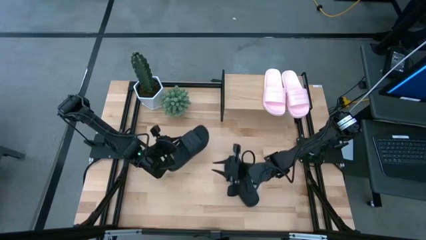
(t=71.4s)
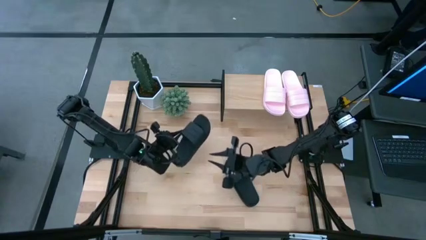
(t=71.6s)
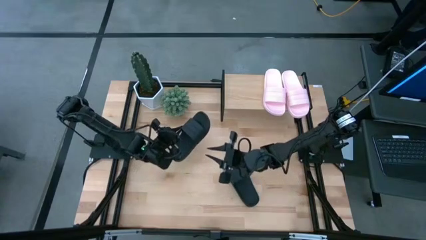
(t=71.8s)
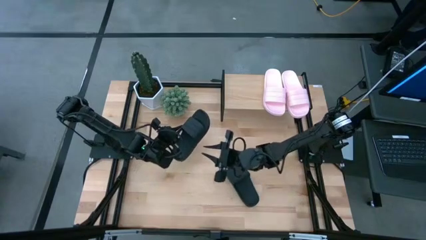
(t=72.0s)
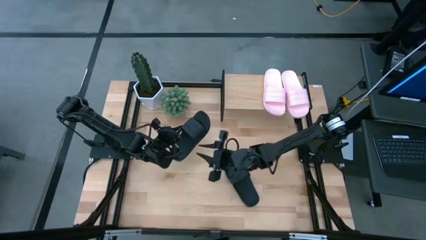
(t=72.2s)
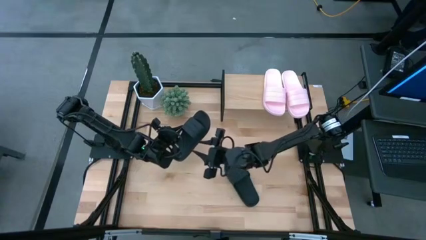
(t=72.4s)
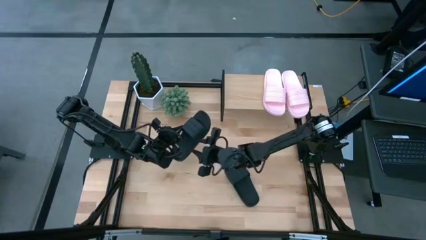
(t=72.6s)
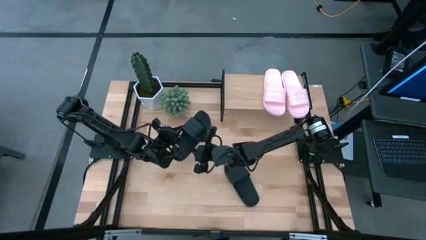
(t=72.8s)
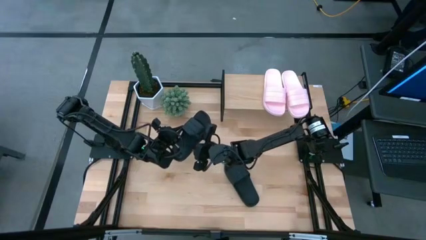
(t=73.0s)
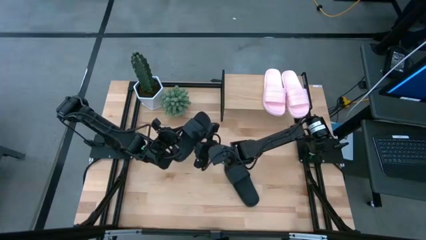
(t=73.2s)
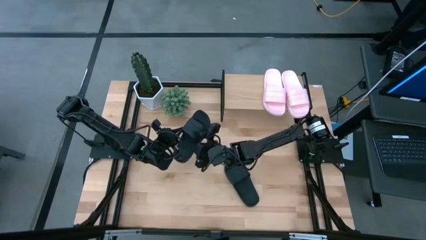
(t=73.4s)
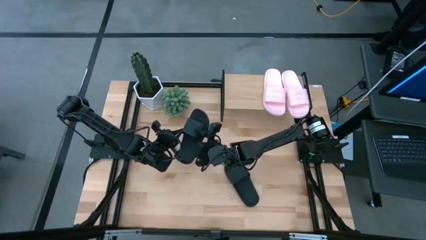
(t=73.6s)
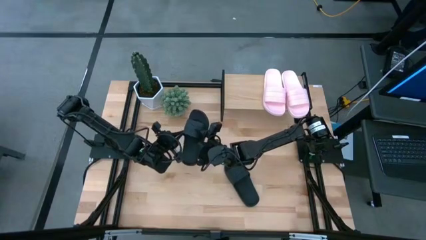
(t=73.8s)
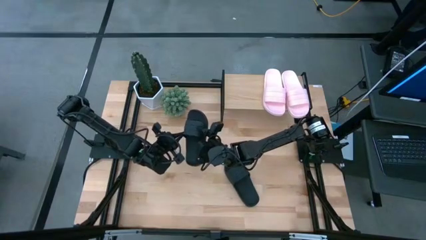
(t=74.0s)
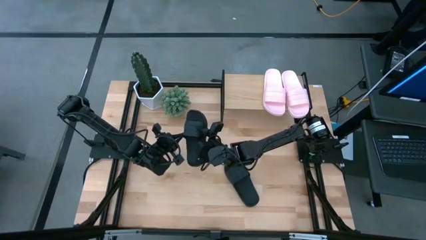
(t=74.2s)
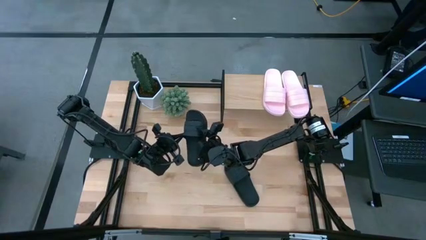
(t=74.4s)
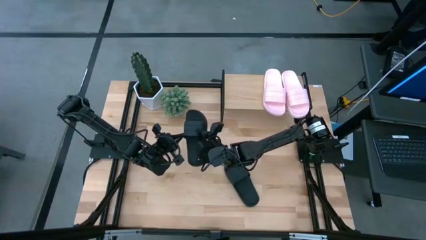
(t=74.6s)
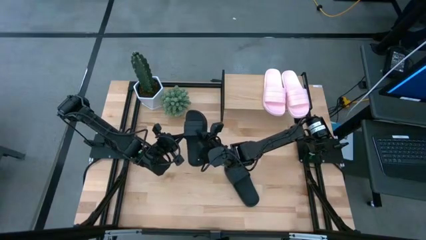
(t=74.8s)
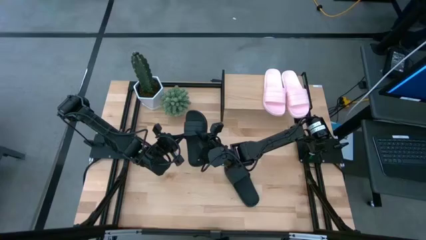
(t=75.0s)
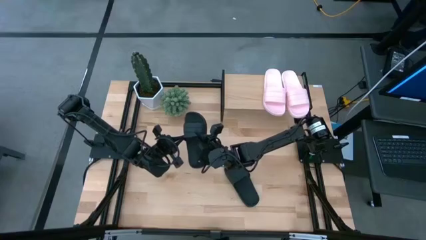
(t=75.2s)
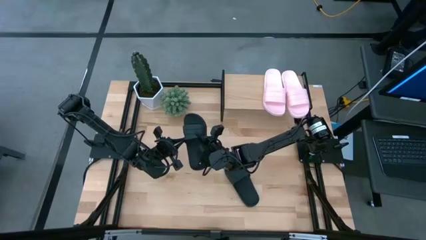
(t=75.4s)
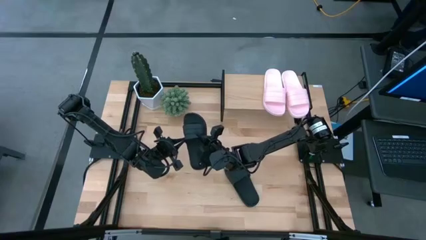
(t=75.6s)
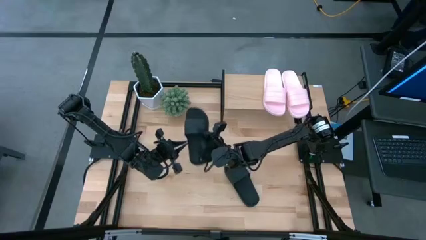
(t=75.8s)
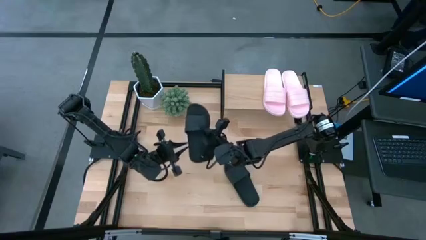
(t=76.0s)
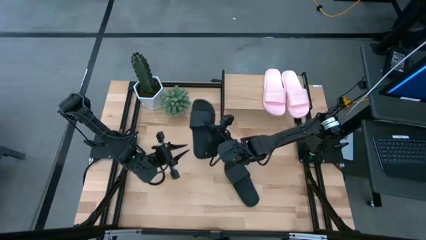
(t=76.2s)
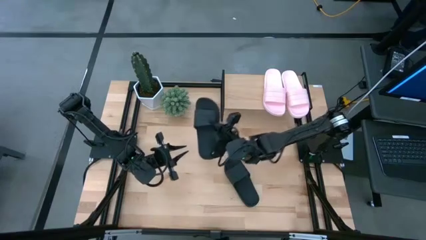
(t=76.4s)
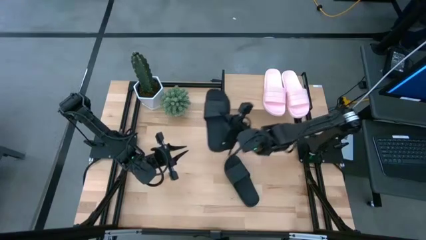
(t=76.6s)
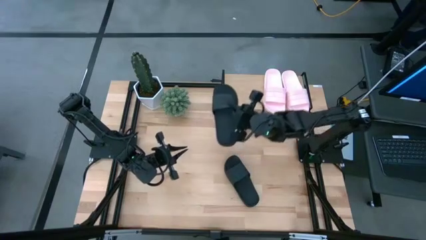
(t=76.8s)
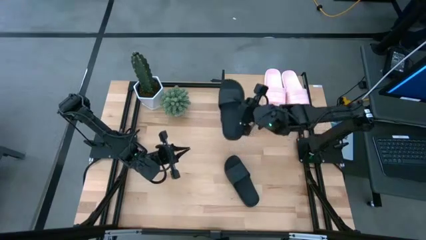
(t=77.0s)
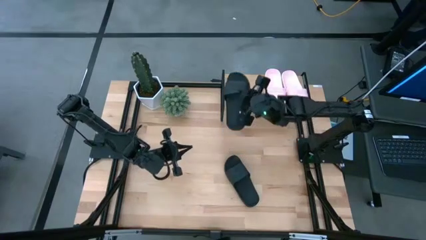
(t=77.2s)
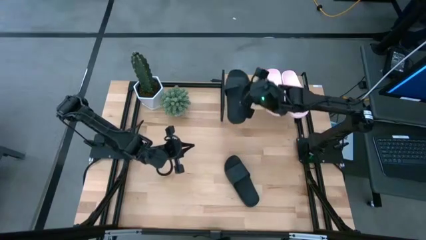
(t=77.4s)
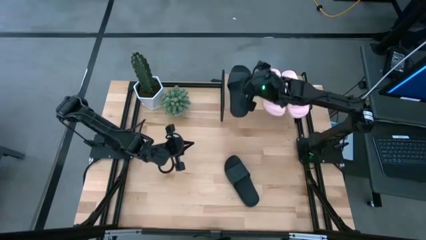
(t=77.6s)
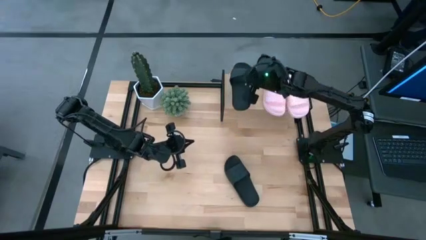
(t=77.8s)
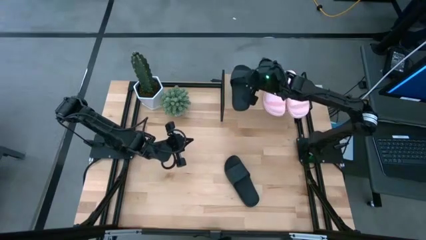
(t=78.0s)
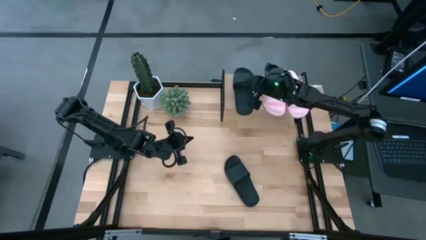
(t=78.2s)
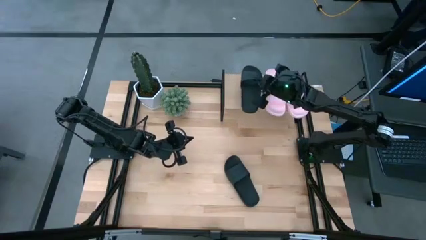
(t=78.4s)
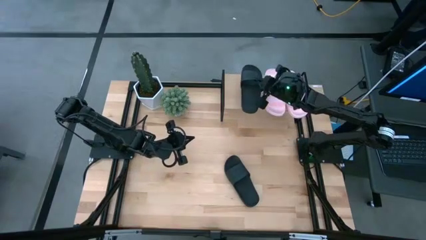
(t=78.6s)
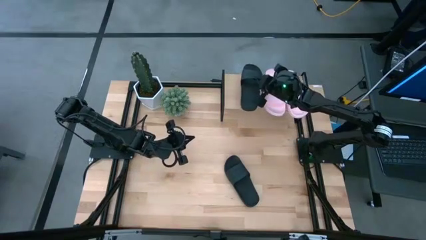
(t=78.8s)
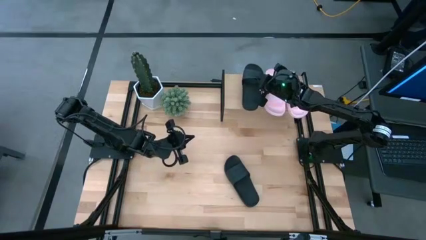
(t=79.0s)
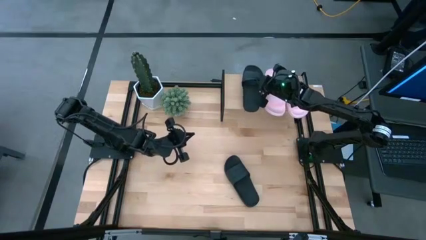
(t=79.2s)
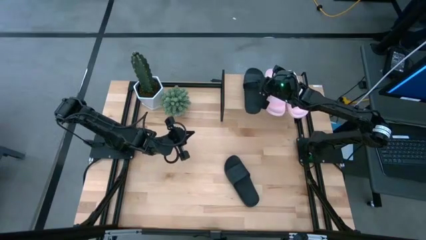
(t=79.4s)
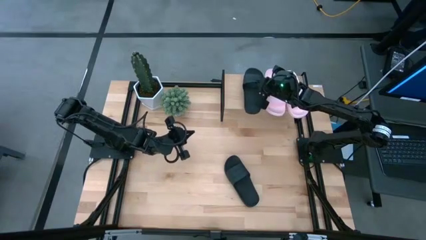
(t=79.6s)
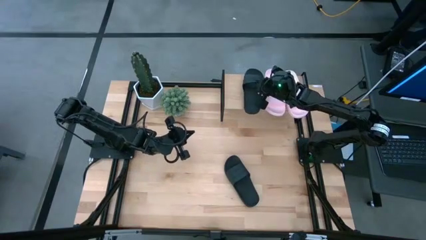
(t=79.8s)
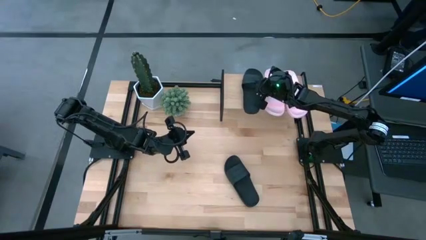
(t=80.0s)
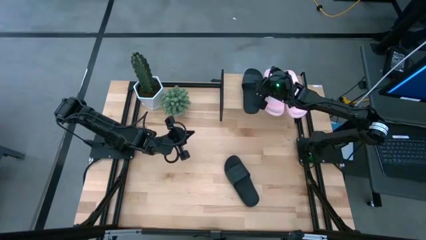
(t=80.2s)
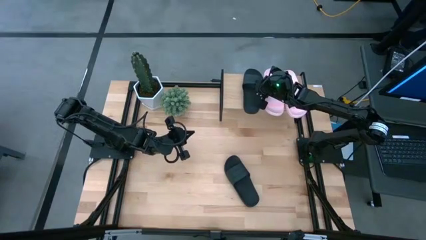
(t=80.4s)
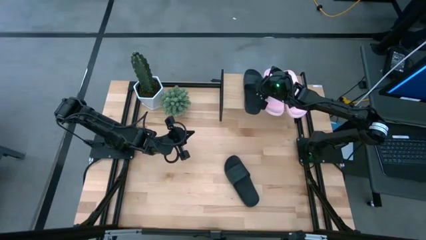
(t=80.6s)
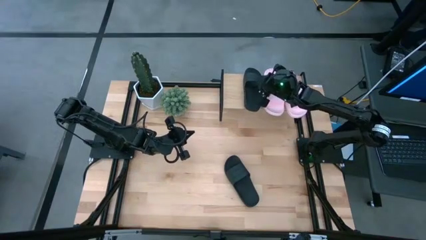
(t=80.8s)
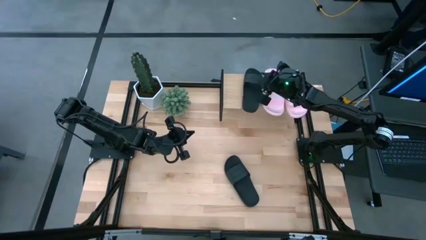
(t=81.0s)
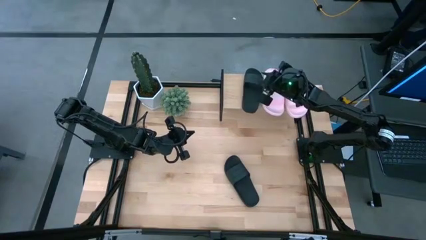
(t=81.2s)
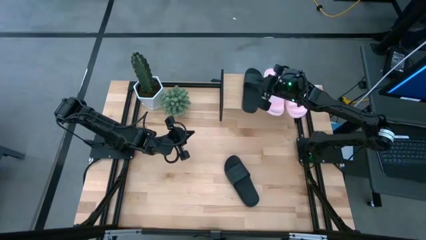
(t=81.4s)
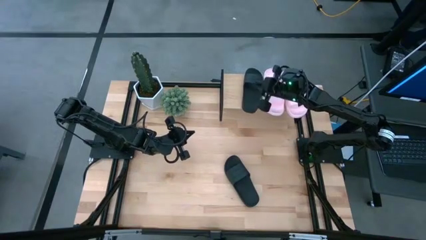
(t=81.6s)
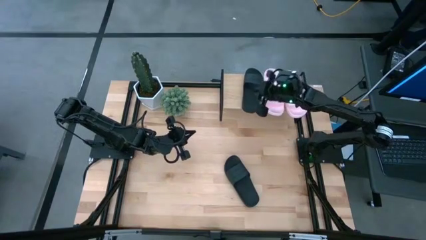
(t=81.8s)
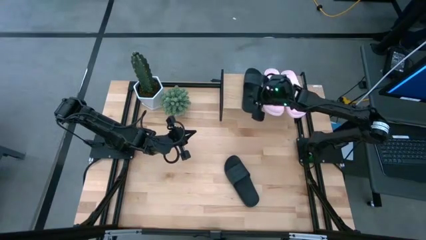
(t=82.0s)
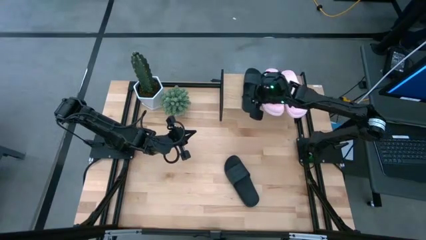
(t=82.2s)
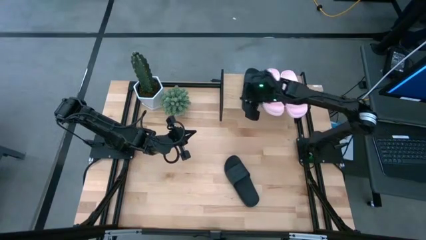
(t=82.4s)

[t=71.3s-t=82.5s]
Task: Pick and place slides into the shelf
Put the left black slides on the shelf

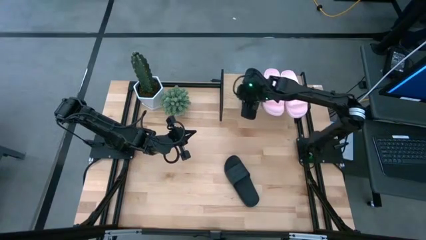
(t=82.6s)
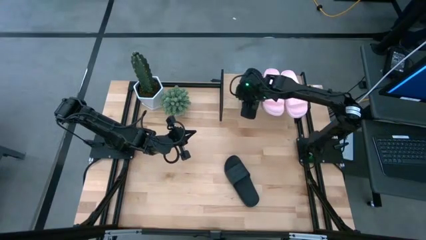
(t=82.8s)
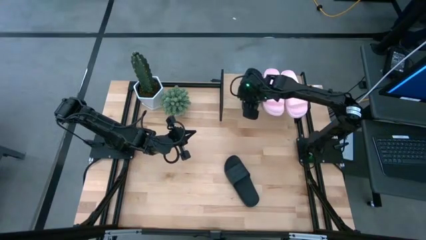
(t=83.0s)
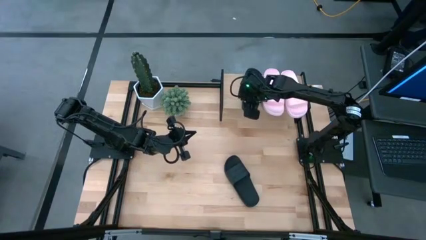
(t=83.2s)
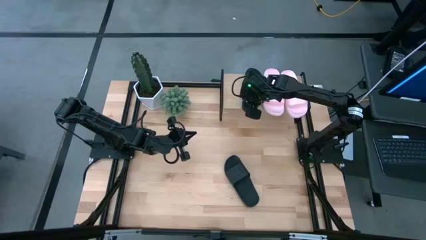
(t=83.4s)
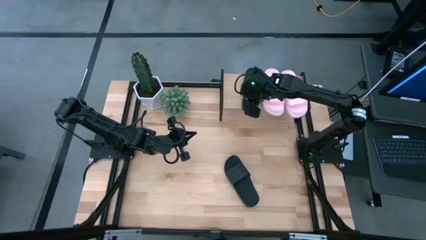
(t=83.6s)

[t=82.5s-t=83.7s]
Put the left black slides on the shelf

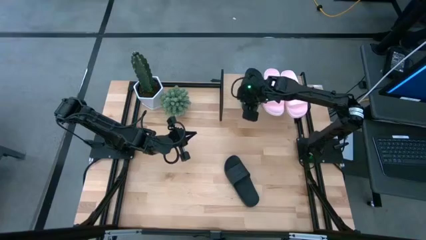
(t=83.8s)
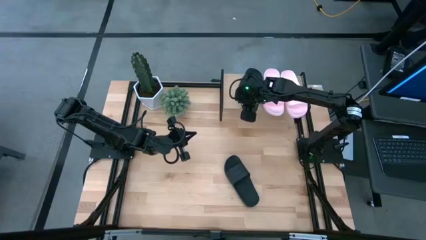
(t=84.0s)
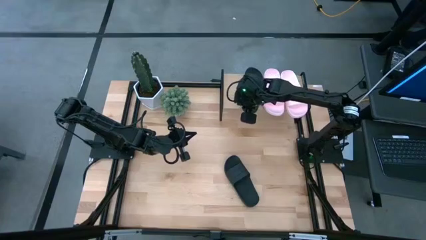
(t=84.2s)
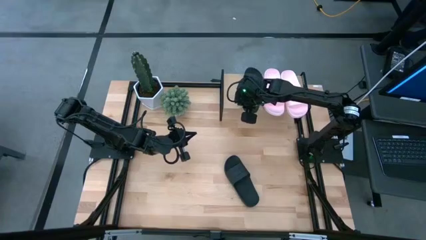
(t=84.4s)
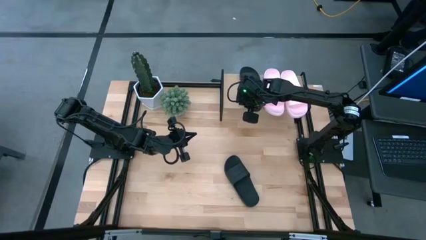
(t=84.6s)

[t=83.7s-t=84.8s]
Put the left black slides on the shelf
